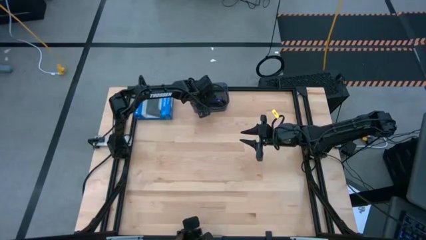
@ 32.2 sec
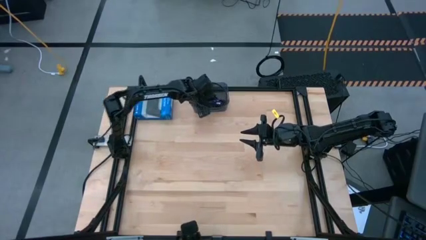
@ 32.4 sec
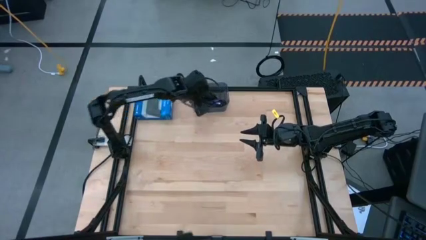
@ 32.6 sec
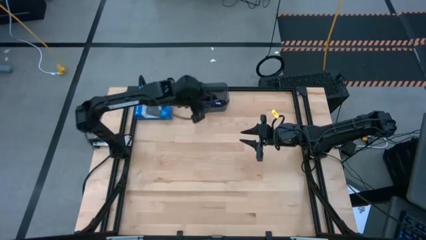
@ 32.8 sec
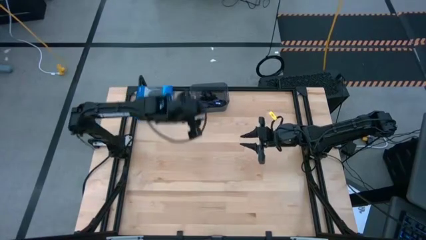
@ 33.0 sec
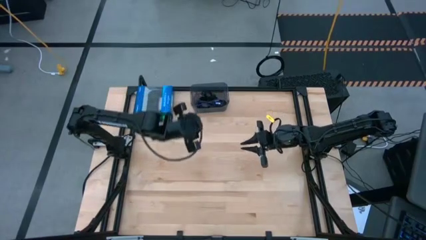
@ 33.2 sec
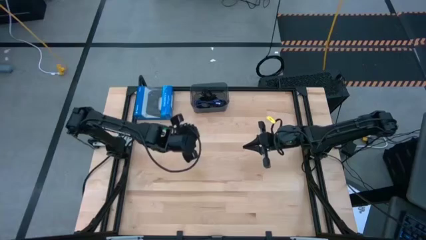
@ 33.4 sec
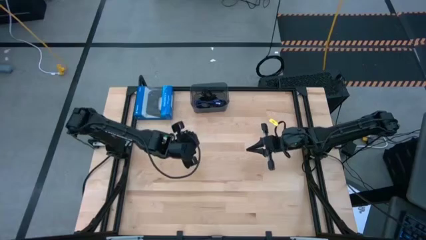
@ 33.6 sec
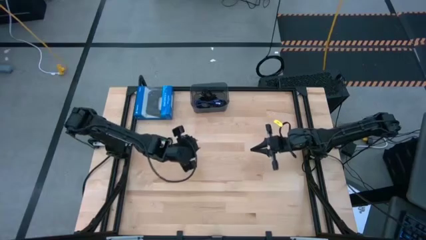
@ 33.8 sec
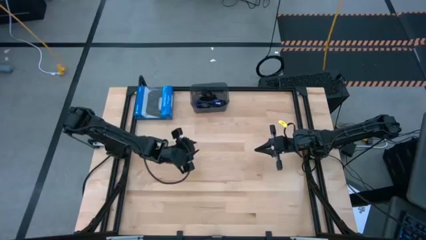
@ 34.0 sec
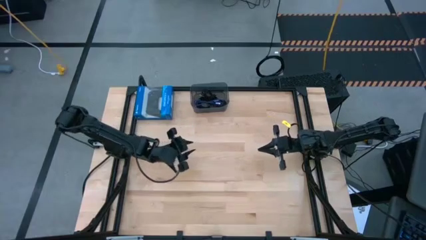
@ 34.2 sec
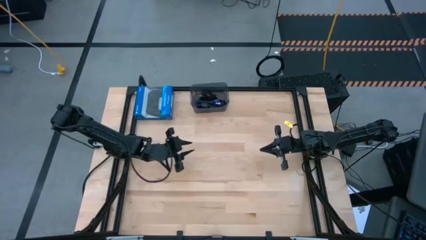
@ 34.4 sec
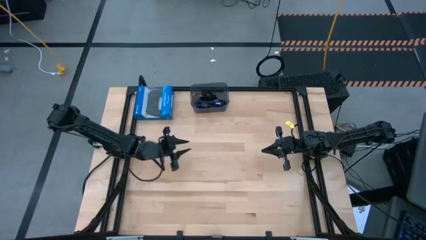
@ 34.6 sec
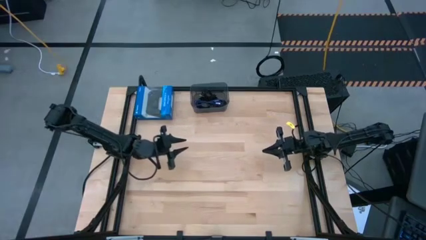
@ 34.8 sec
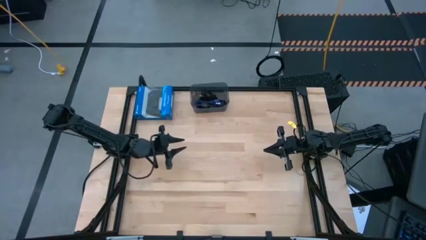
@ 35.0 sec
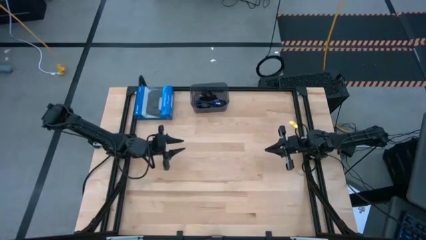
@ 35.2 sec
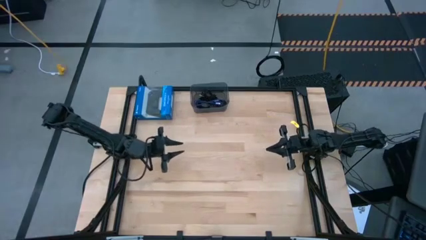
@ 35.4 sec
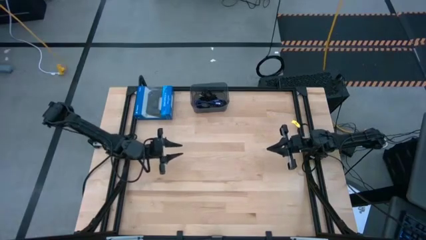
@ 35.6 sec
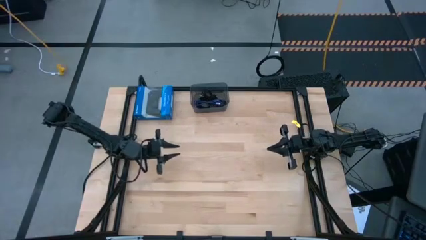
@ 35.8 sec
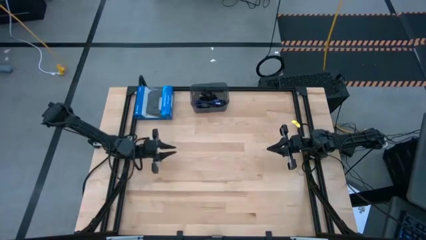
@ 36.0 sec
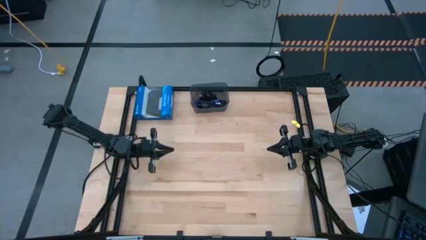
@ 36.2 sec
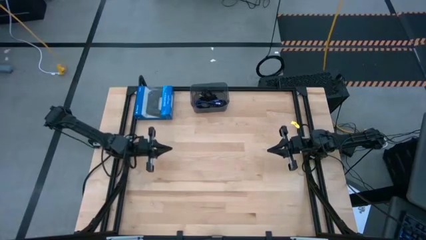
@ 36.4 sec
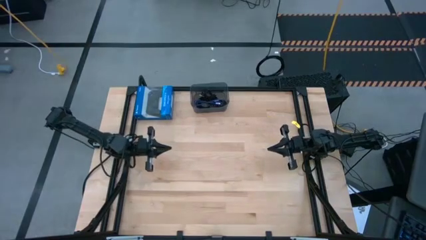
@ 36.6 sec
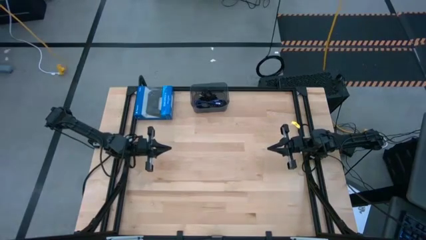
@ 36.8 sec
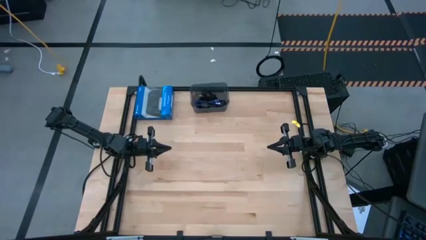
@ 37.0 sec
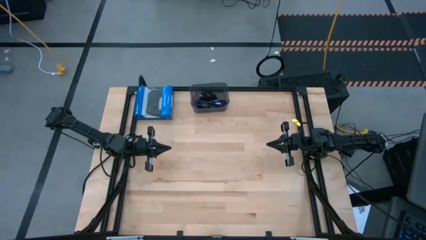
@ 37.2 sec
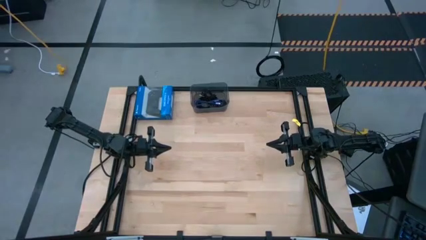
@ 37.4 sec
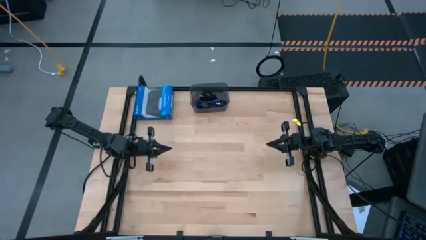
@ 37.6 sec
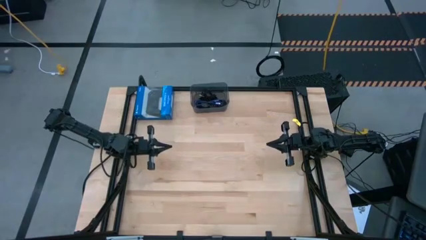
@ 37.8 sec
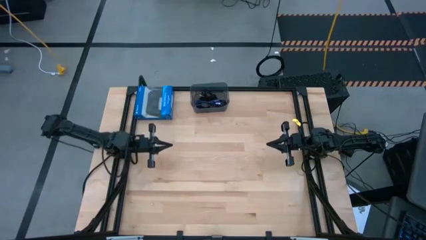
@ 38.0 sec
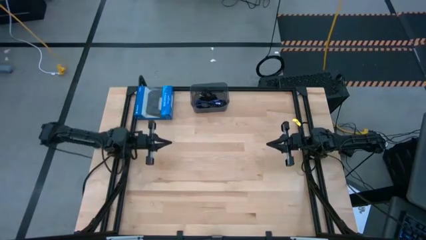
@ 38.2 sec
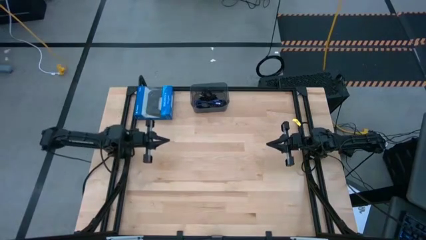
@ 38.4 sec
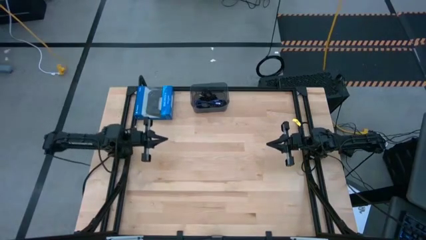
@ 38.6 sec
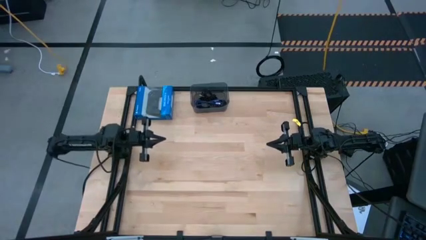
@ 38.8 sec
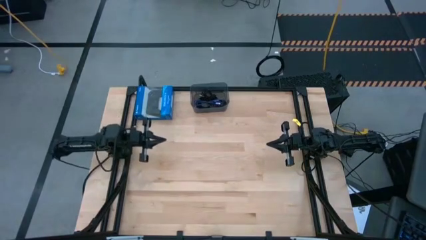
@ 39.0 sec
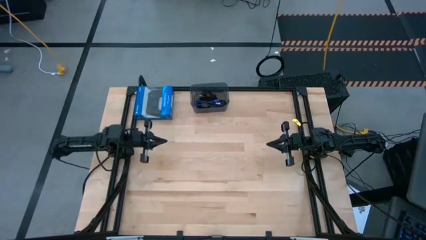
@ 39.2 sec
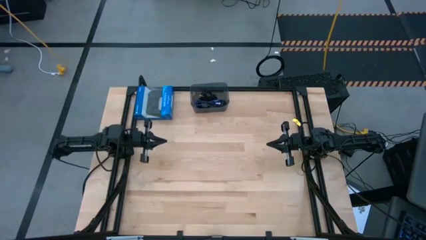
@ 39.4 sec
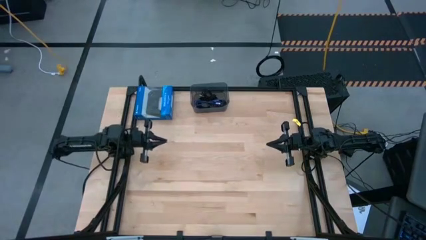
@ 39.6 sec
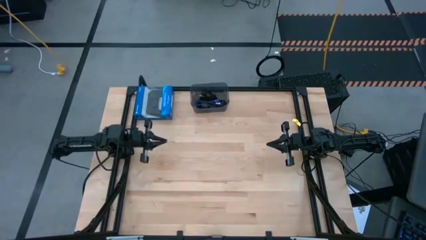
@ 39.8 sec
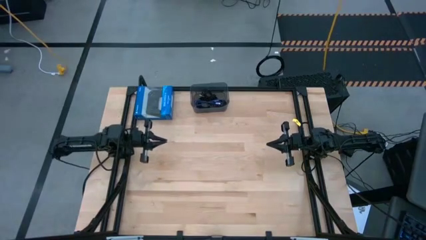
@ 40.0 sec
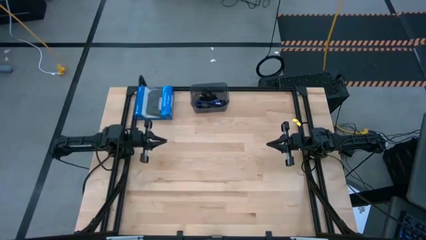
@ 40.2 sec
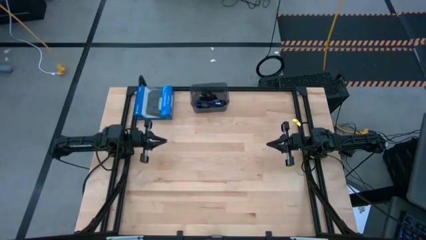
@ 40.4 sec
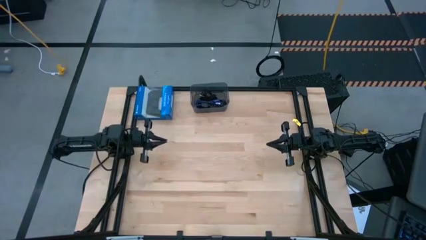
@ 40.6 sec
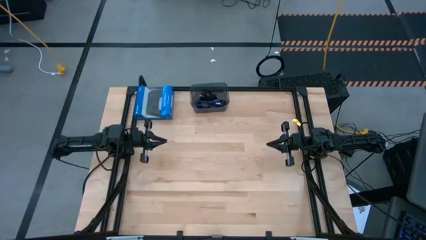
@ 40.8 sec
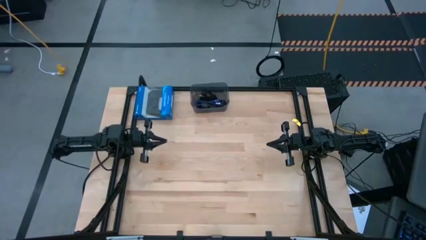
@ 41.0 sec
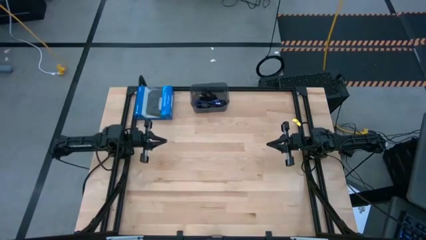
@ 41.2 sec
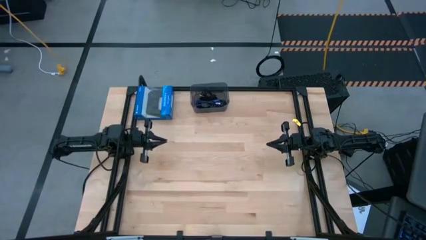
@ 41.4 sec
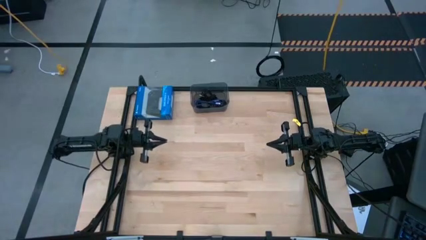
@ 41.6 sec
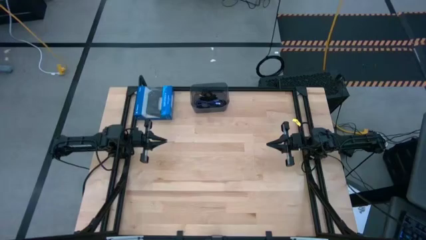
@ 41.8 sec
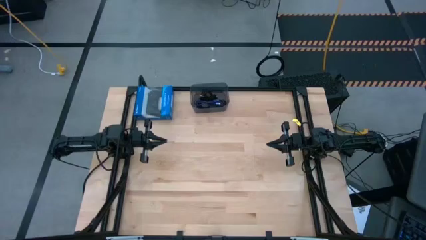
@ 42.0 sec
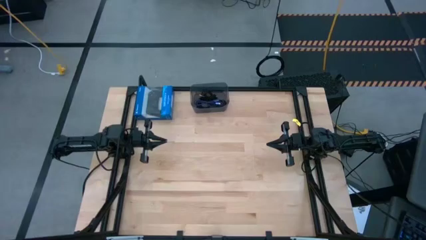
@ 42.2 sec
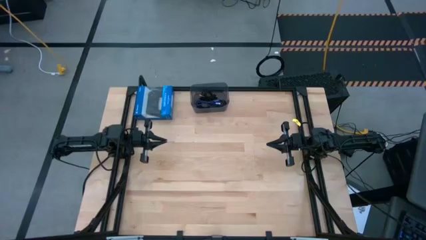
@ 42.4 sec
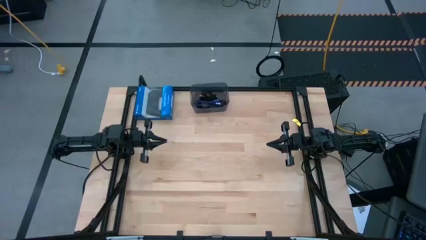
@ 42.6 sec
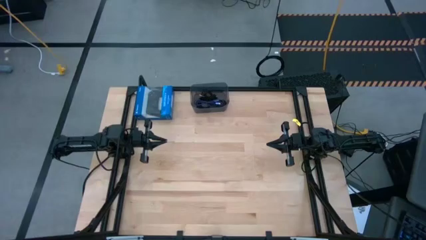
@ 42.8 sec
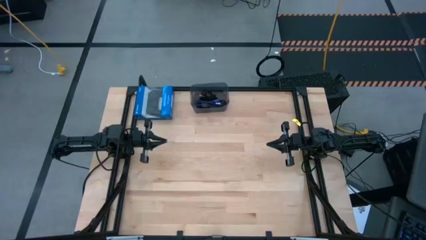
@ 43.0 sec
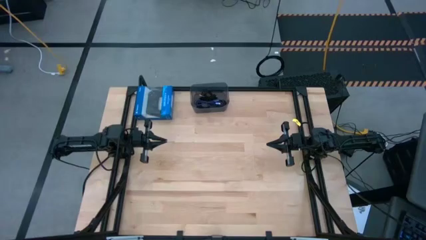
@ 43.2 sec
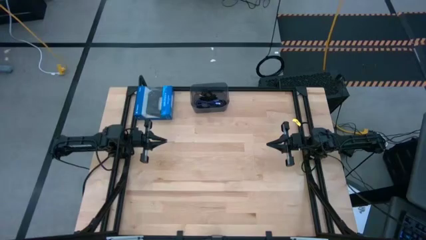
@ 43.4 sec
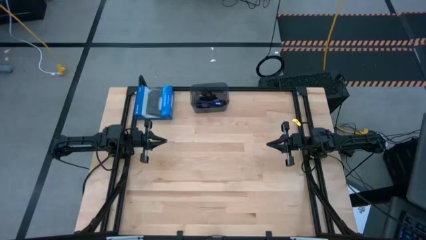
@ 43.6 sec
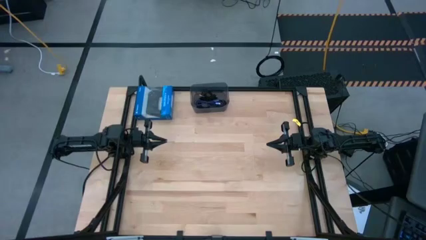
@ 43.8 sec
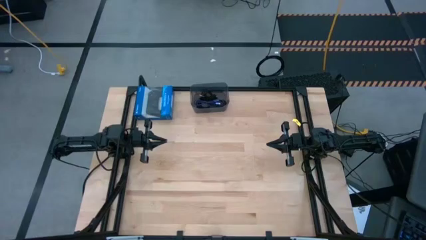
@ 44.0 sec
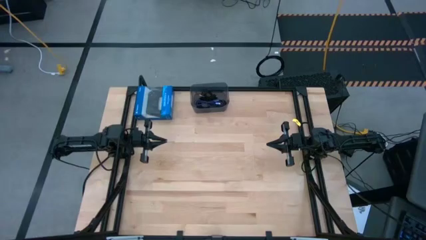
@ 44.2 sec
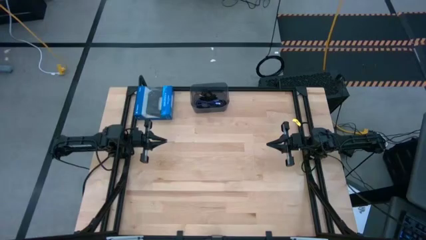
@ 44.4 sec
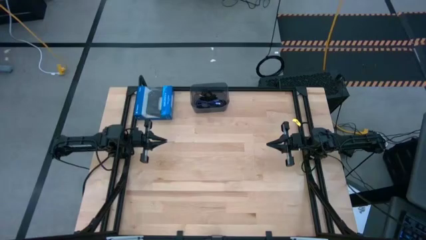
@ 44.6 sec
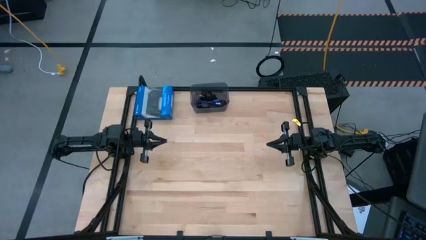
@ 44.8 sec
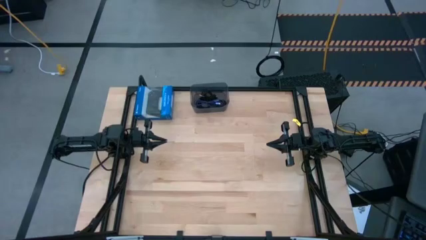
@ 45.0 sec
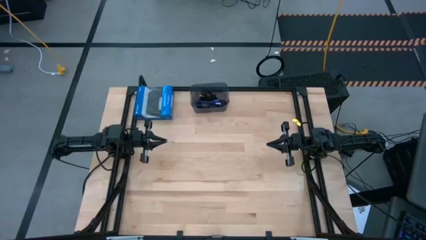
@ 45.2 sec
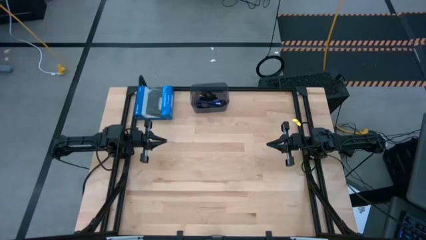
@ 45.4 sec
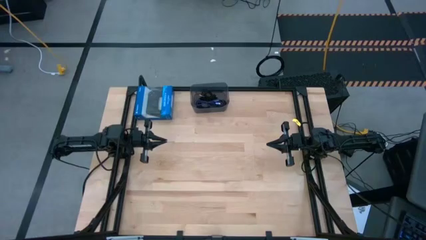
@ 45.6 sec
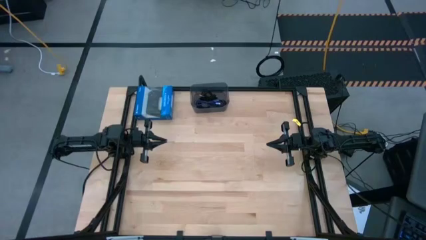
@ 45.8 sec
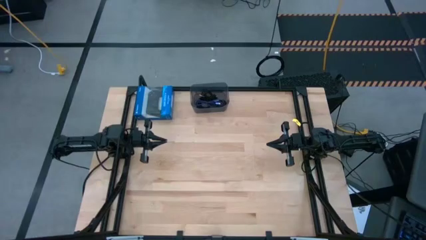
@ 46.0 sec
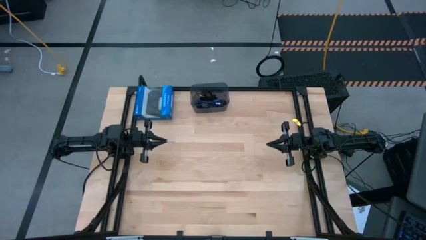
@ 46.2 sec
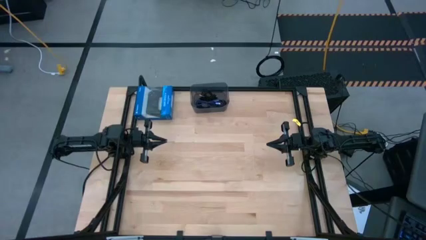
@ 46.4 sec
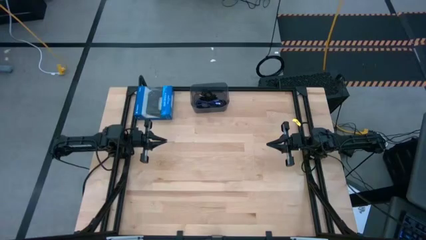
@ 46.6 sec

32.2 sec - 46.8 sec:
Task: Pick and place USB-C Cables
Return to Home Position
